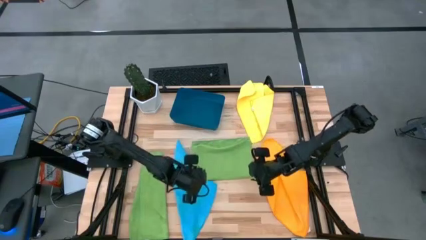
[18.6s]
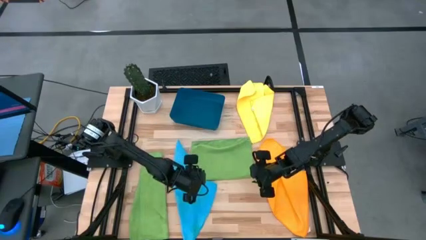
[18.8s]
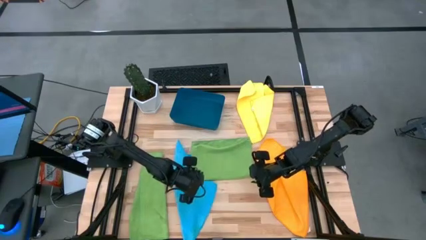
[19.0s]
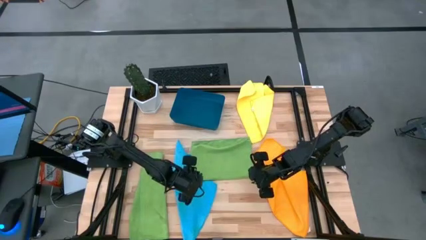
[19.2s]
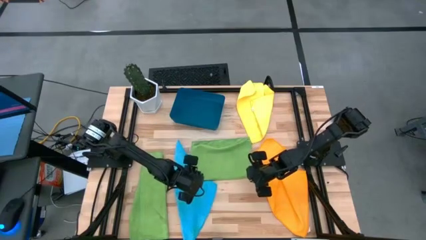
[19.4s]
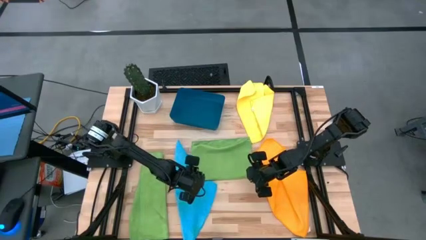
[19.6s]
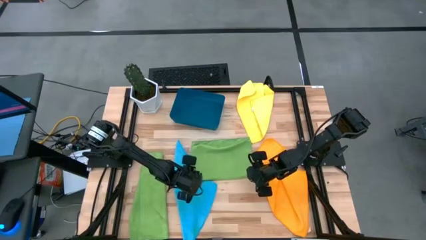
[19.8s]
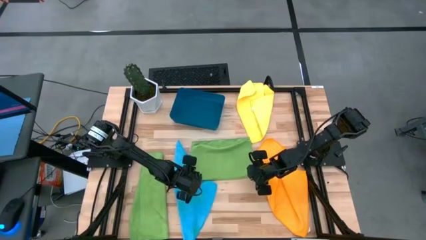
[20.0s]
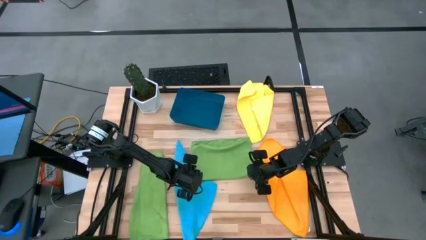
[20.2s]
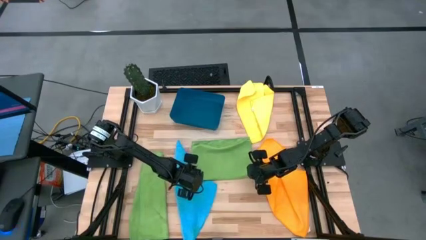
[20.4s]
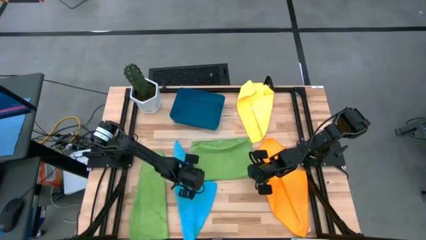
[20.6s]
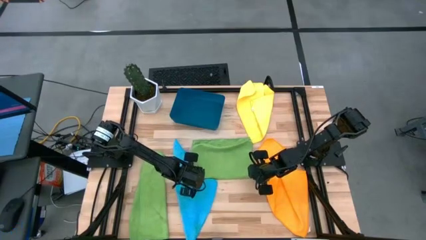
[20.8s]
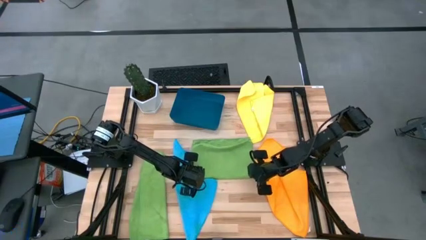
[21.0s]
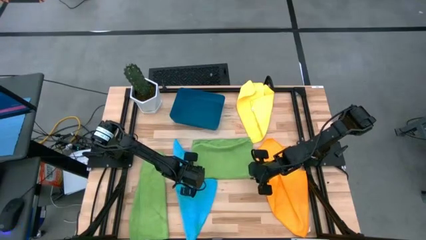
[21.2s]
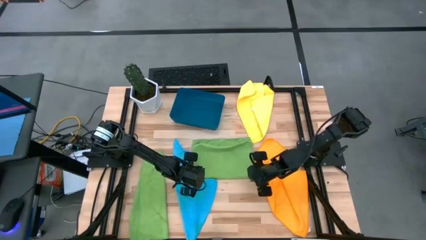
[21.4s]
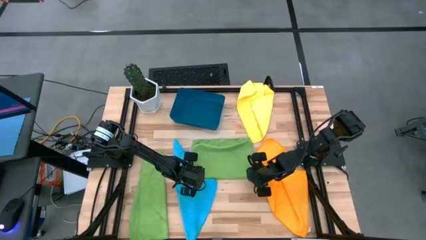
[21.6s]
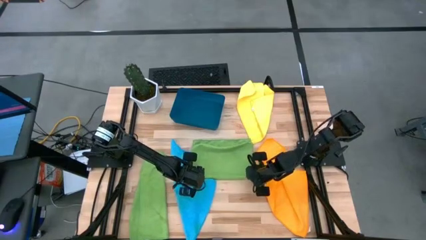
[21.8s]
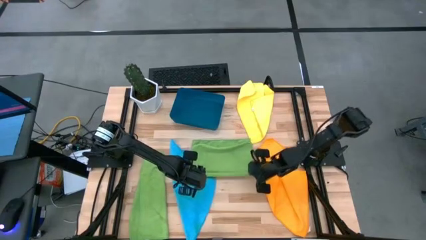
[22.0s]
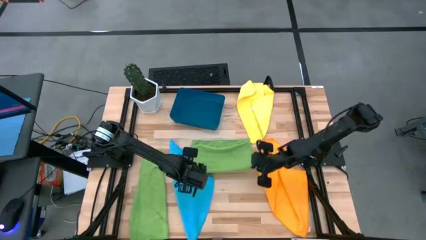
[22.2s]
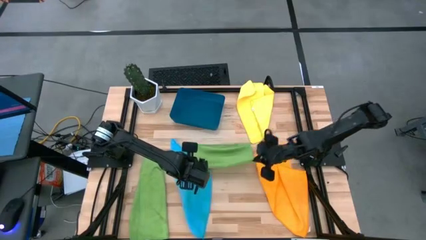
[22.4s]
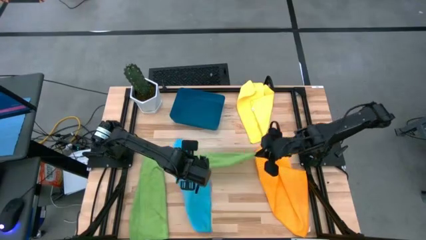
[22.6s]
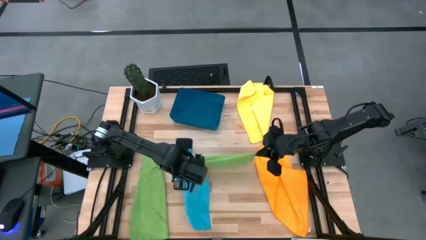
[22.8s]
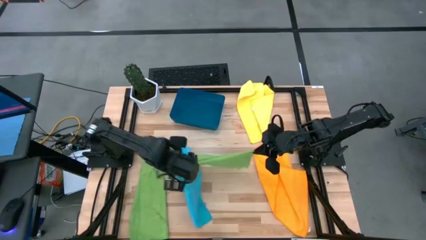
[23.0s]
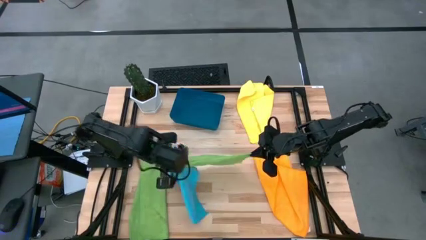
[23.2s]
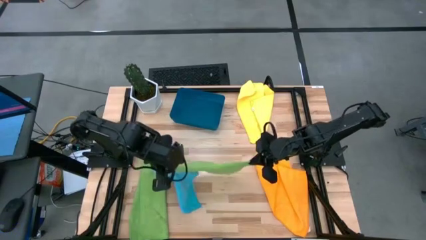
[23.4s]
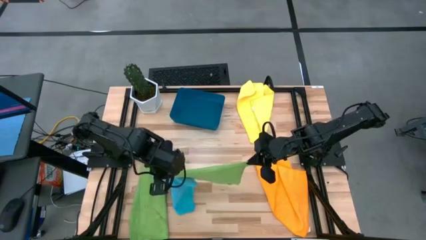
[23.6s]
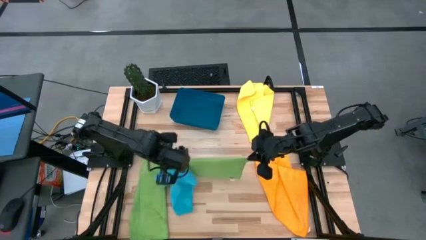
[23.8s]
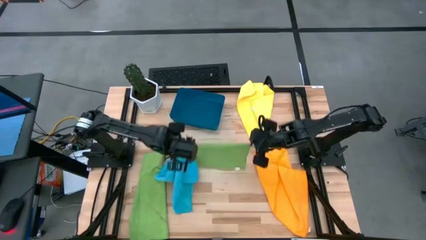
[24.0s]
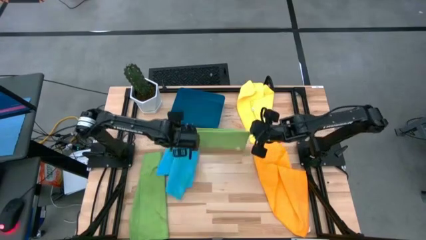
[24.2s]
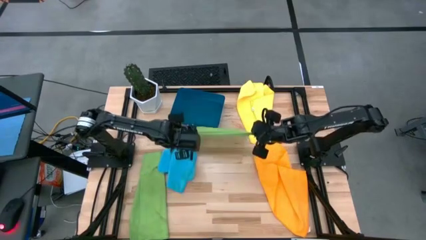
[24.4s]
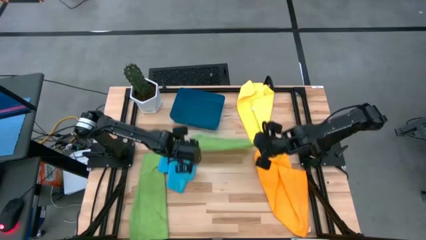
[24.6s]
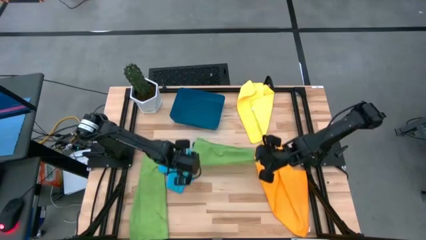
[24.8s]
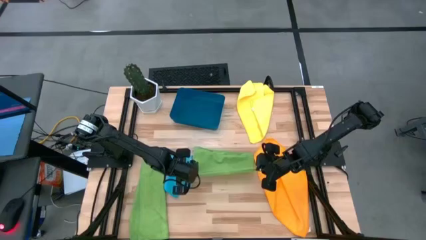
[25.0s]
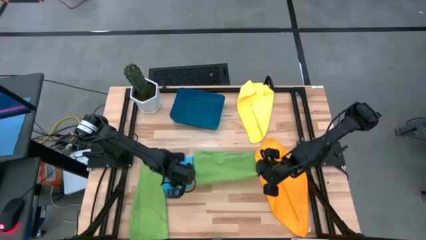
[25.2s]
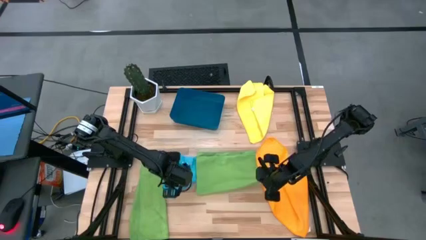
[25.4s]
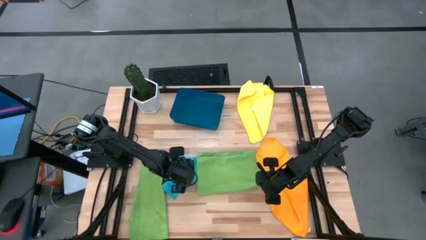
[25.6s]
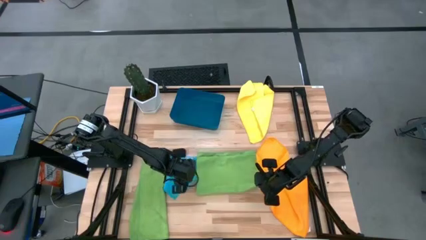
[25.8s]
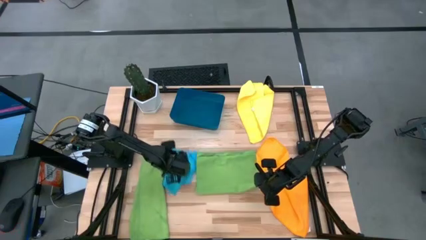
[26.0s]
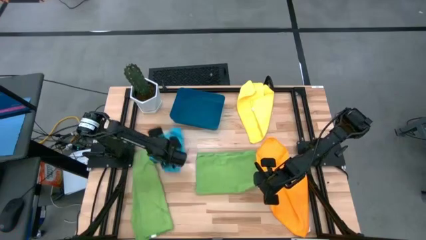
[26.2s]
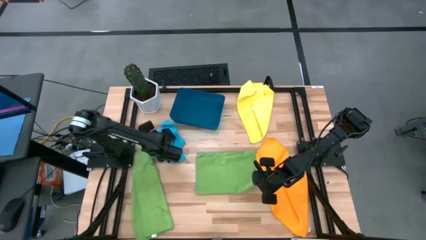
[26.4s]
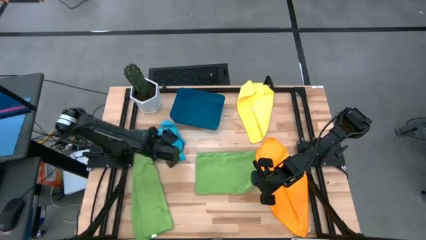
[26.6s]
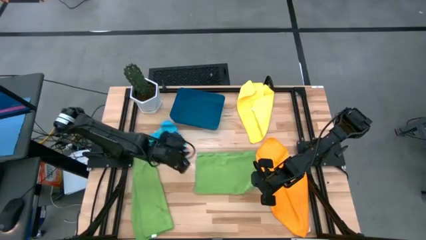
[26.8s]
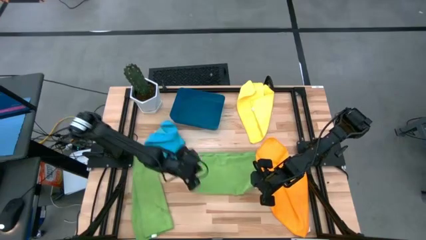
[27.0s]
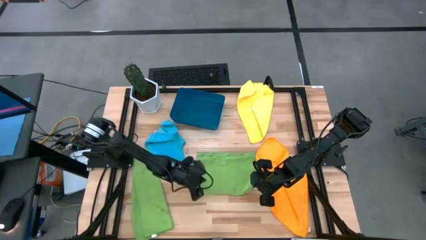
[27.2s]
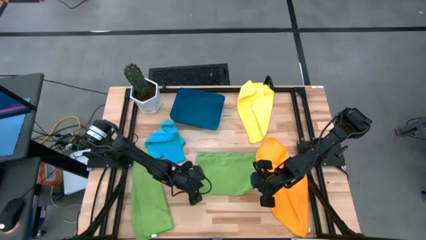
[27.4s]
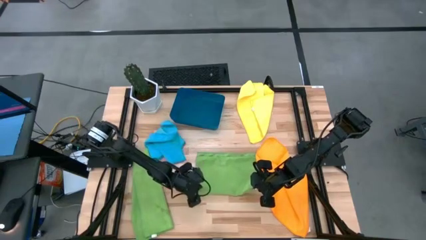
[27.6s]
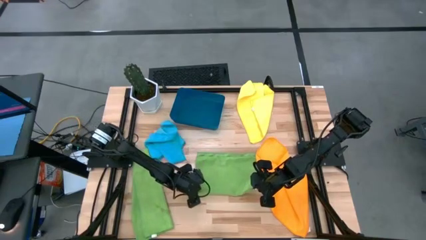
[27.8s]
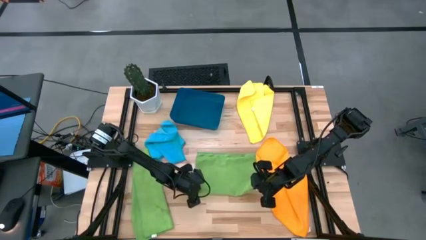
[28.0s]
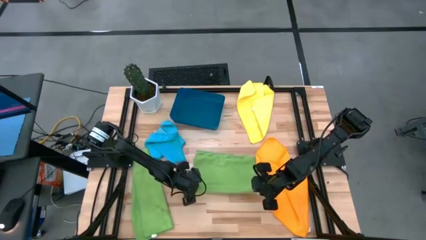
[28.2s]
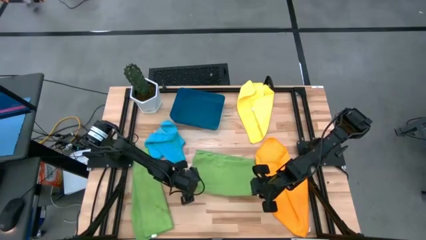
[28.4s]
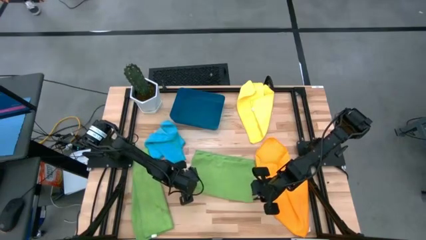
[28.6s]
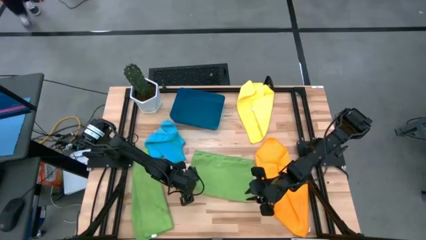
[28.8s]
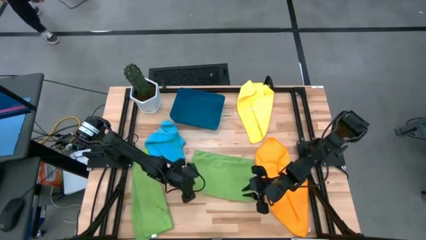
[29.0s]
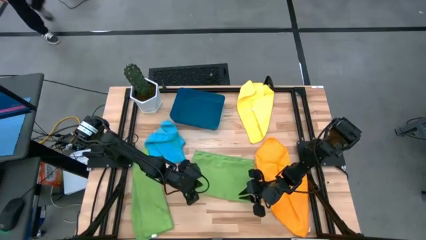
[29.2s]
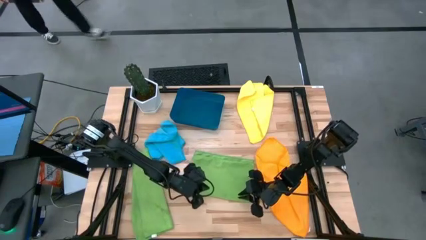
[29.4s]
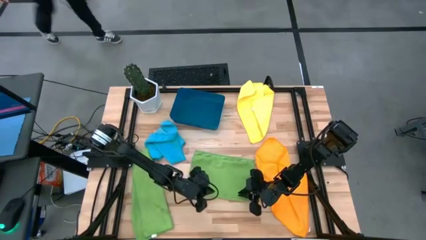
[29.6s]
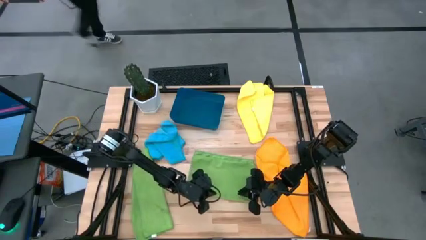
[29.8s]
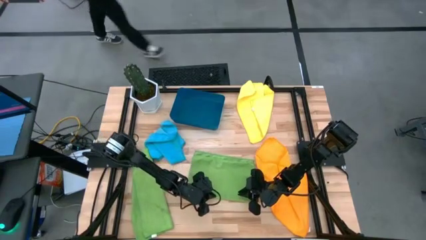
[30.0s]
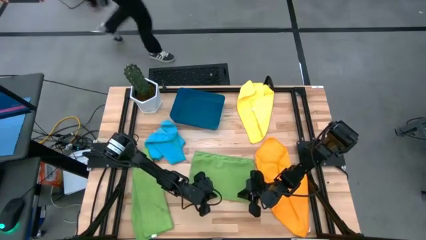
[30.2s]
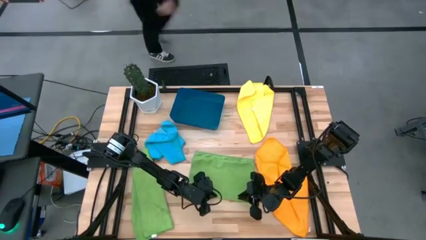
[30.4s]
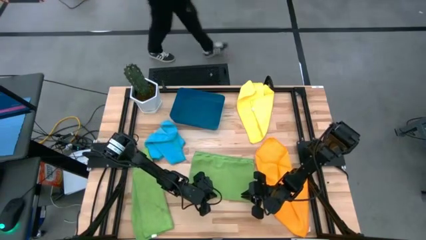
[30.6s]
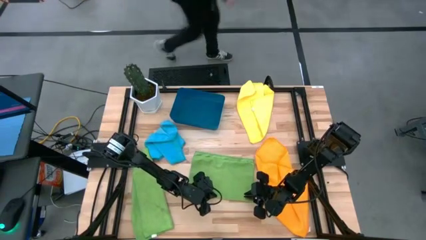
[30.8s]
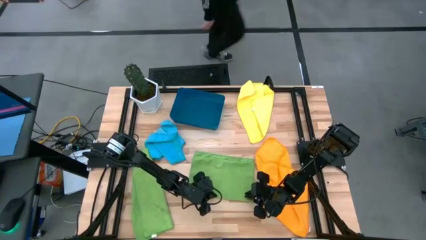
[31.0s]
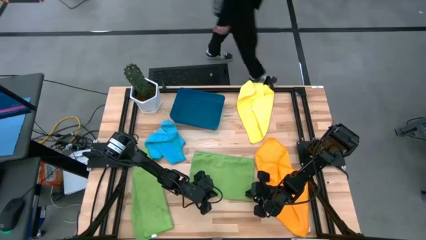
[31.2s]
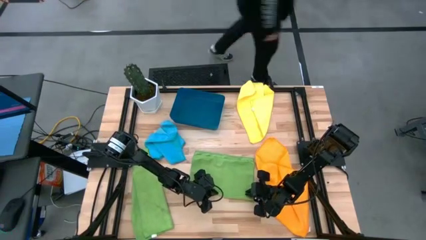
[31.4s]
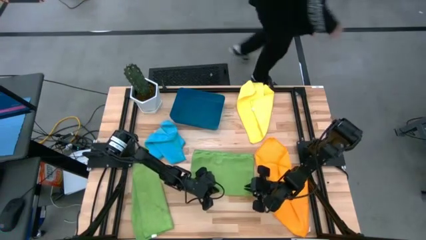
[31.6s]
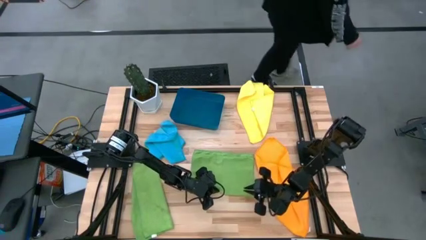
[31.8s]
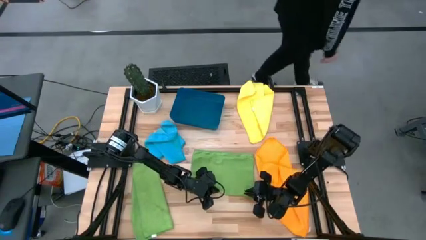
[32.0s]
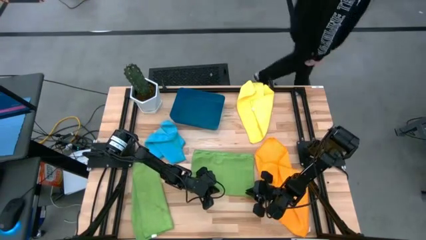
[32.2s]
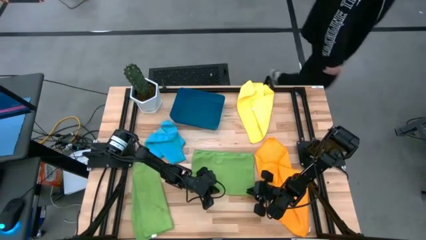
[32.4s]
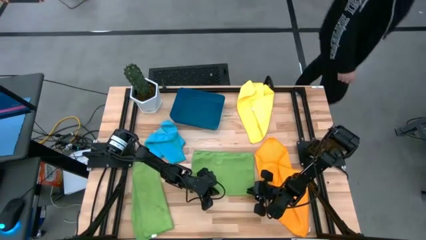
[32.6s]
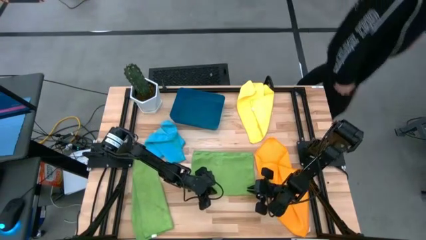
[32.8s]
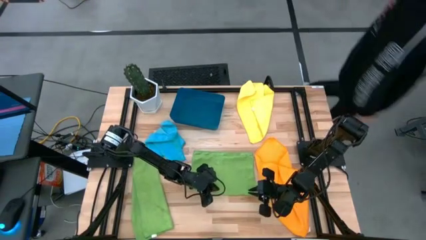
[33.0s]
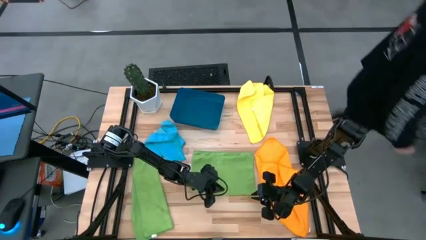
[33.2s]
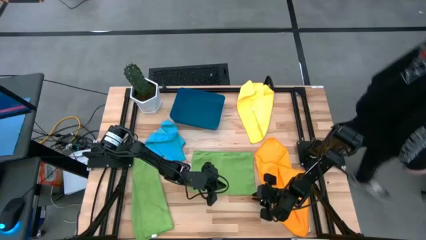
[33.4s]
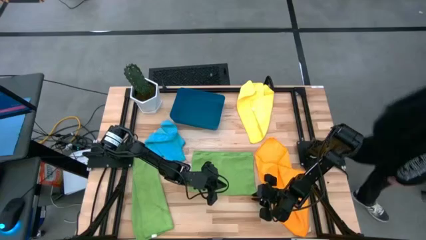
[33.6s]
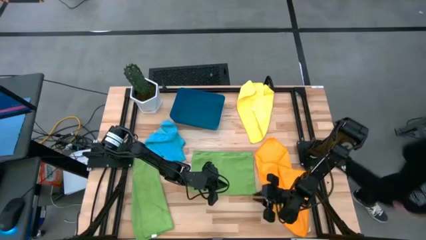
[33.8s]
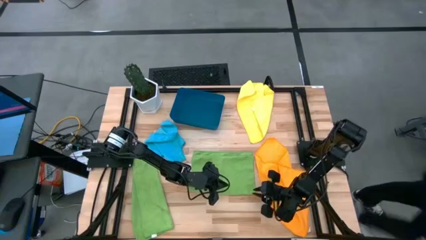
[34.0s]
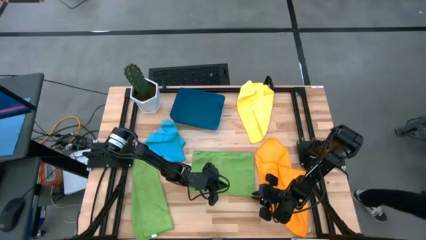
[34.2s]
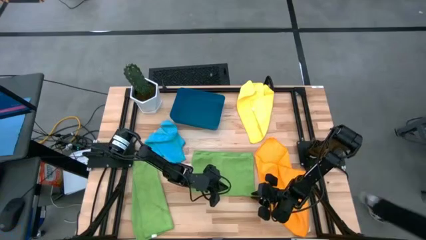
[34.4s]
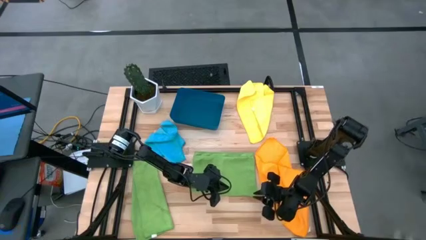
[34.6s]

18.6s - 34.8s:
Task: Fold microfiber towels
Fold the right green towel
